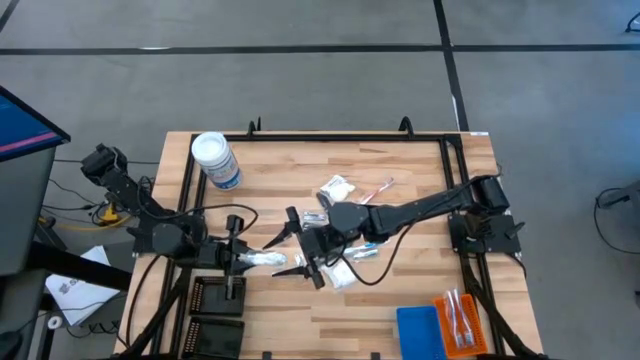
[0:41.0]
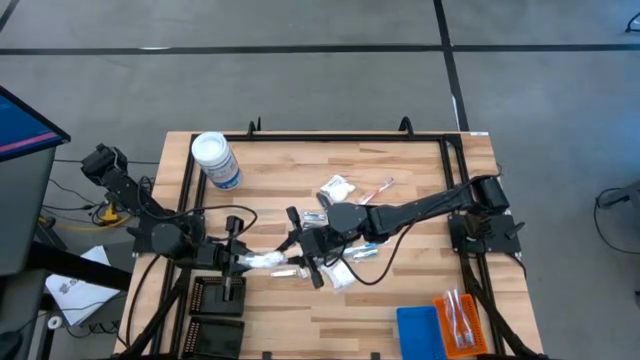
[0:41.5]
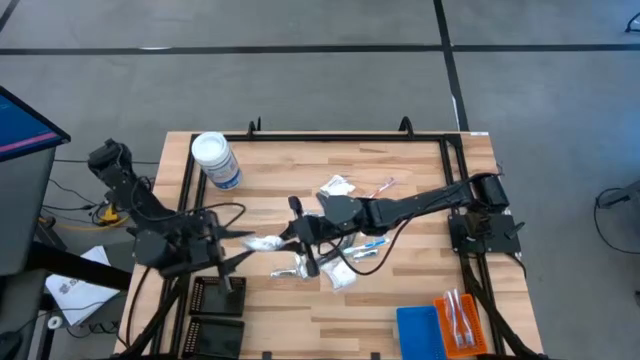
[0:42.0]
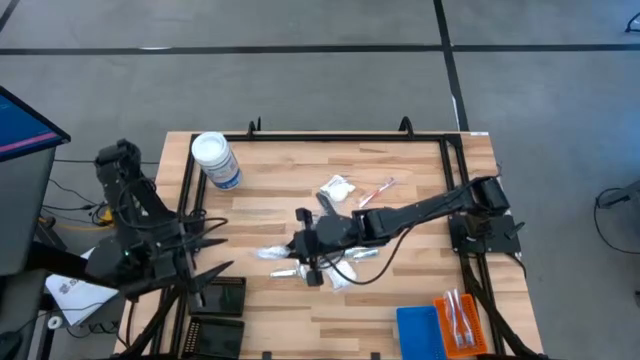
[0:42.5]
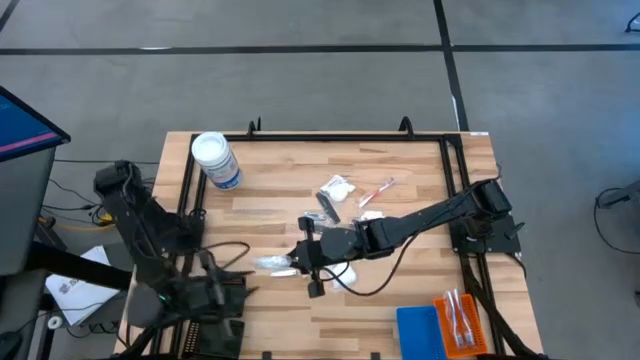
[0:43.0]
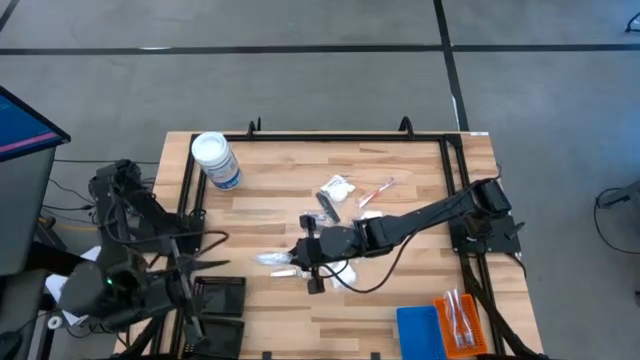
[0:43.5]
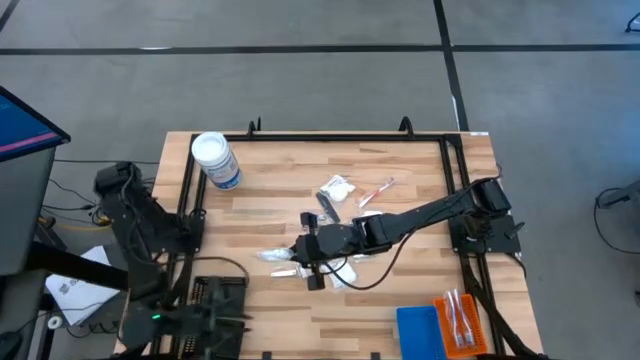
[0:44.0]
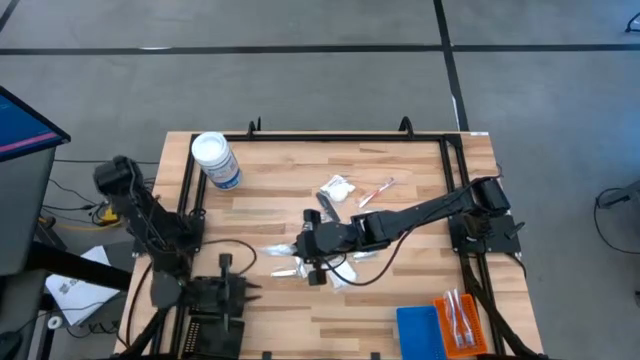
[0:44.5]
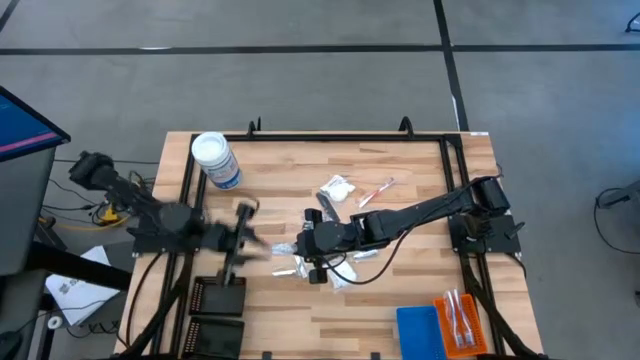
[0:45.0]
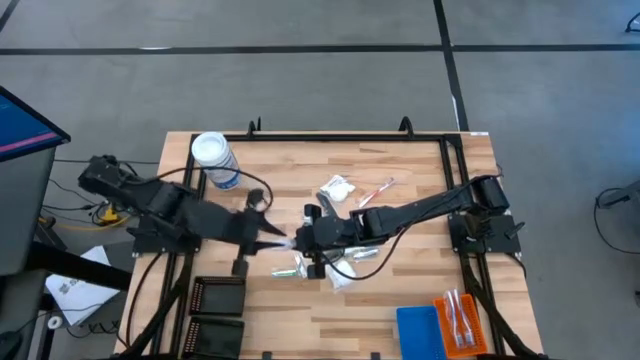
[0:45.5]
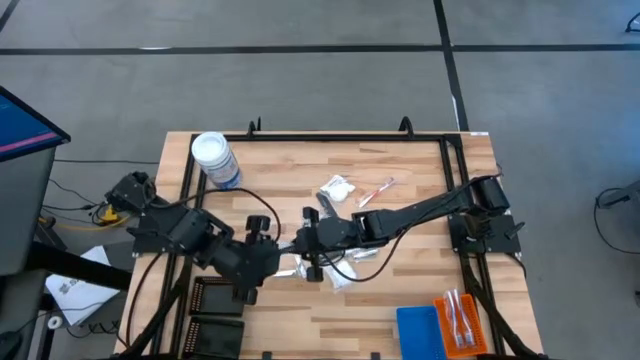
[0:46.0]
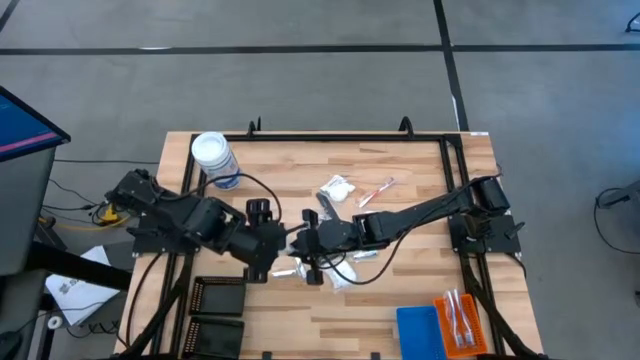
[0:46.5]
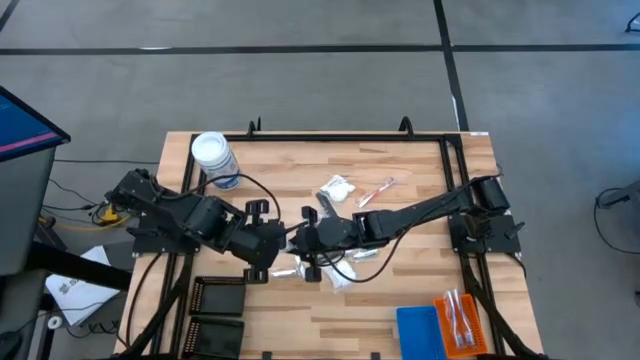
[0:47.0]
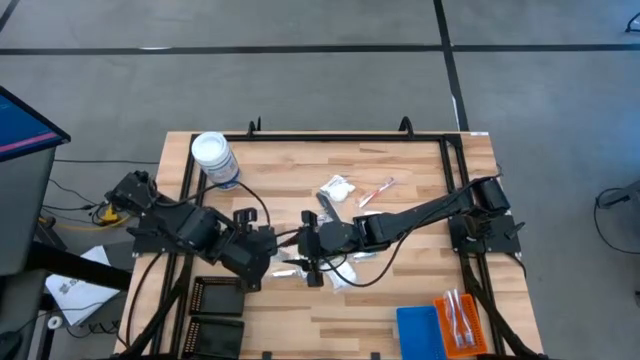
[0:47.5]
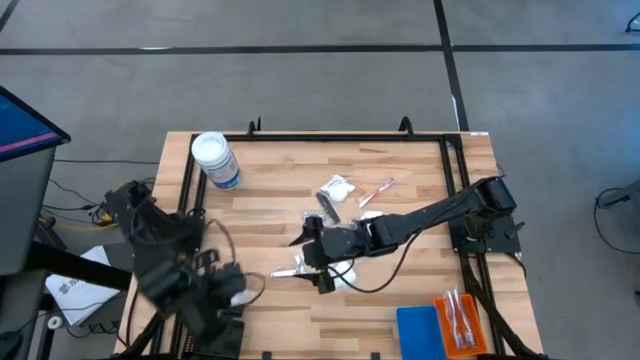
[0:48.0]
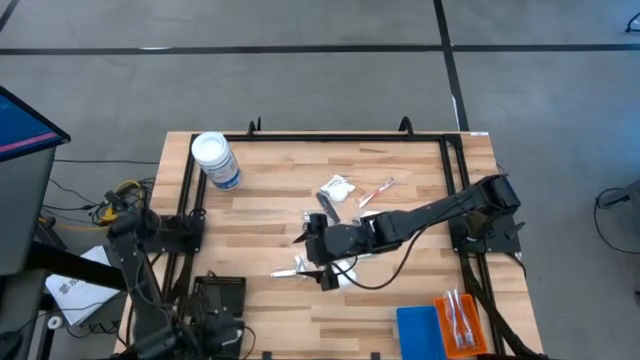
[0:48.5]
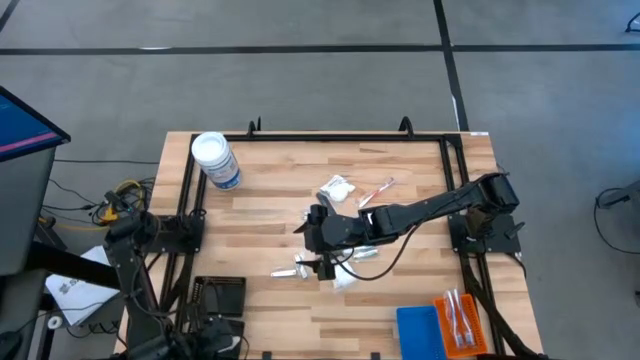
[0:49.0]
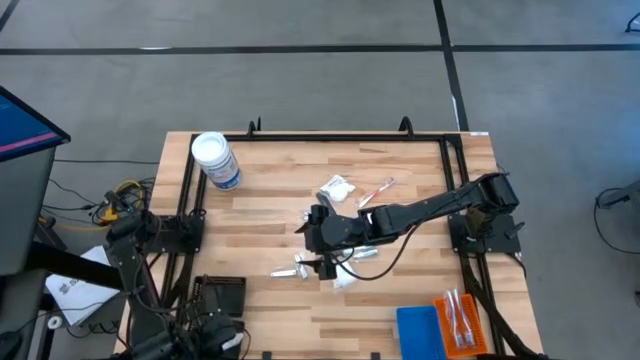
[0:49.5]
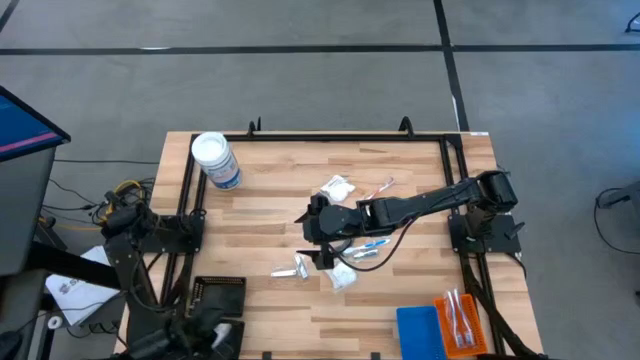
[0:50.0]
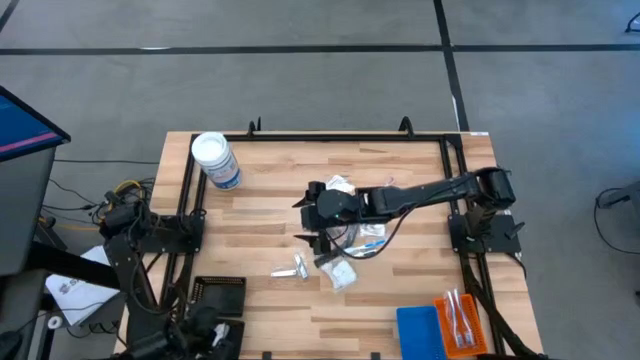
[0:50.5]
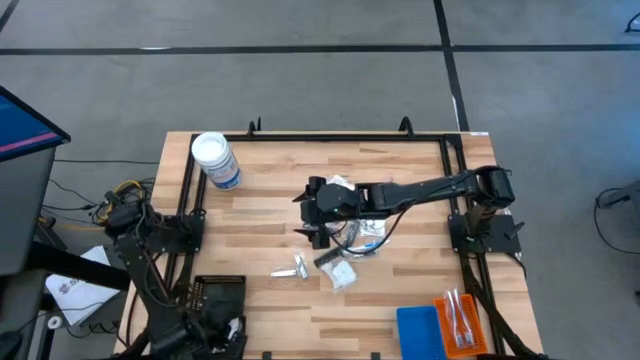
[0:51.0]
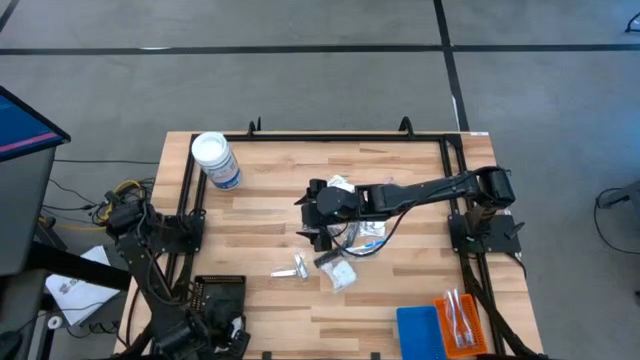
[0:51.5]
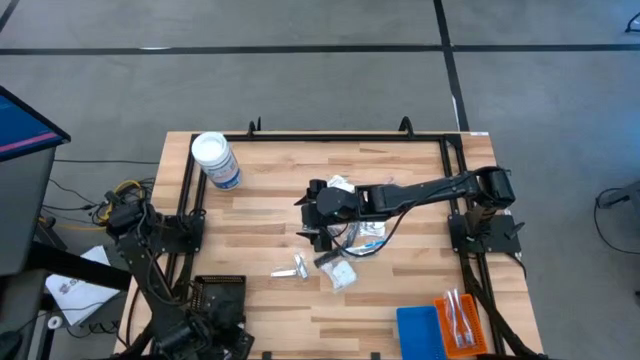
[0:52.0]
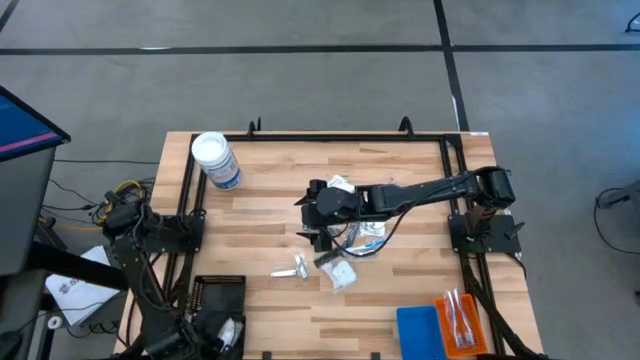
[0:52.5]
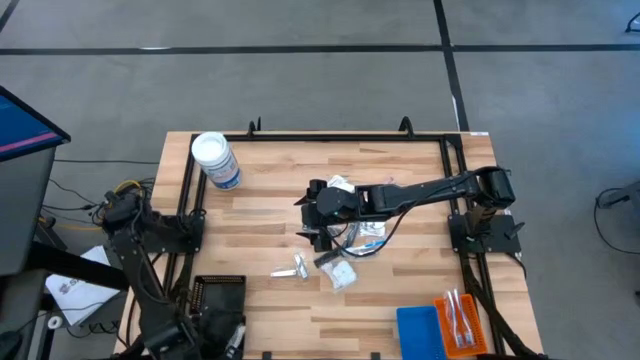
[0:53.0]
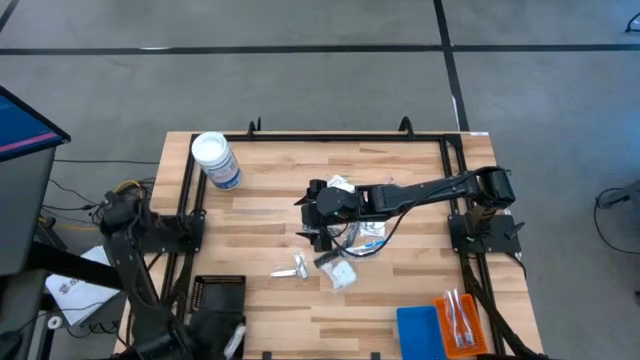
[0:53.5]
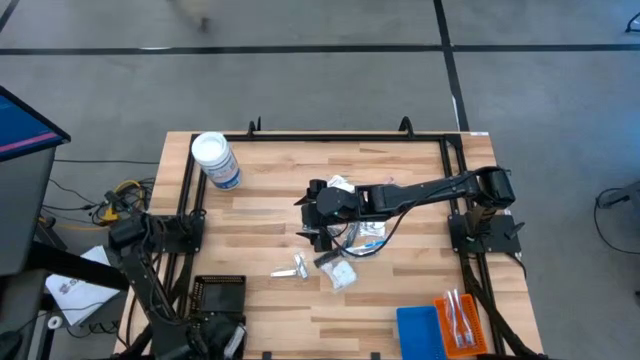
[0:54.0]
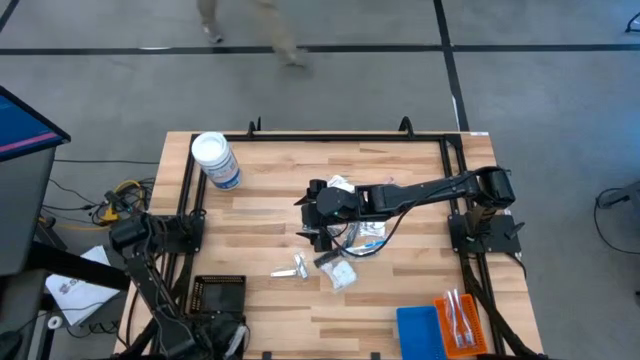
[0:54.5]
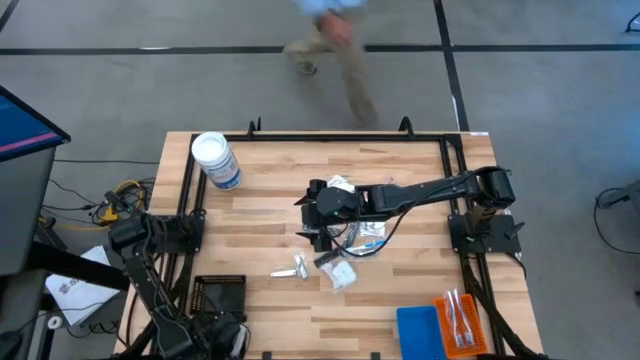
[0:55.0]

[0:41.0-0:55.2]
Task: Pick & Place Travel size toiletries
Put the vanity pack into the bottom black bin

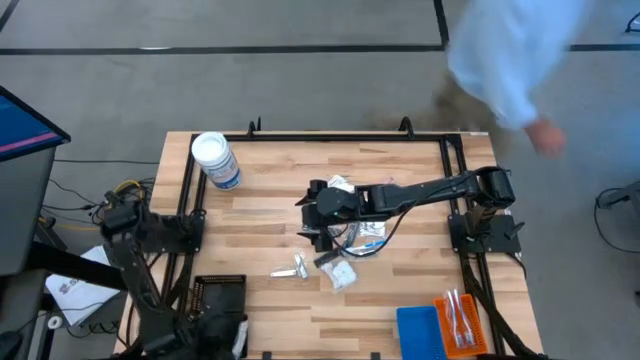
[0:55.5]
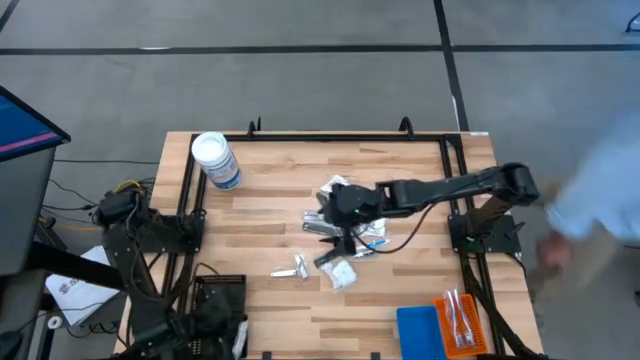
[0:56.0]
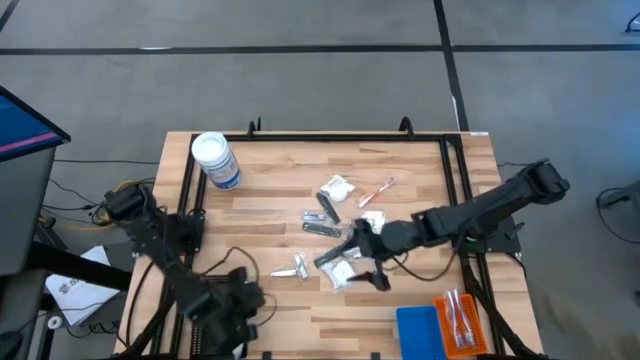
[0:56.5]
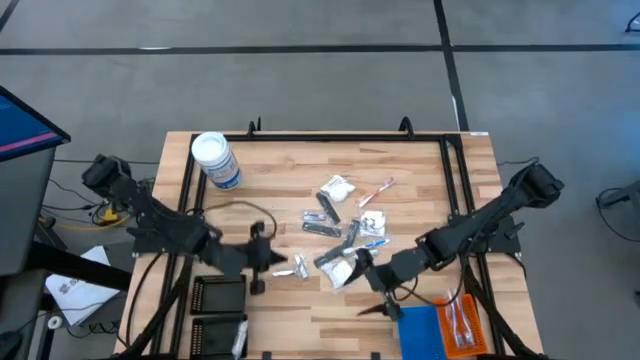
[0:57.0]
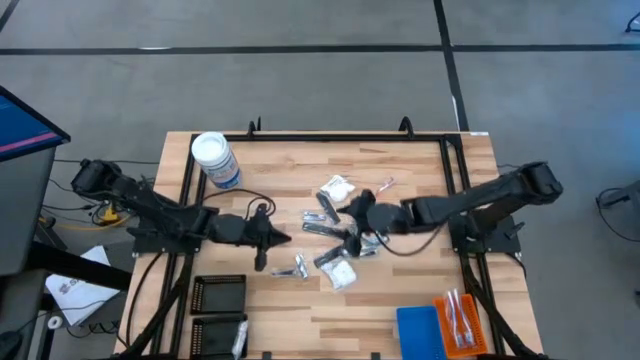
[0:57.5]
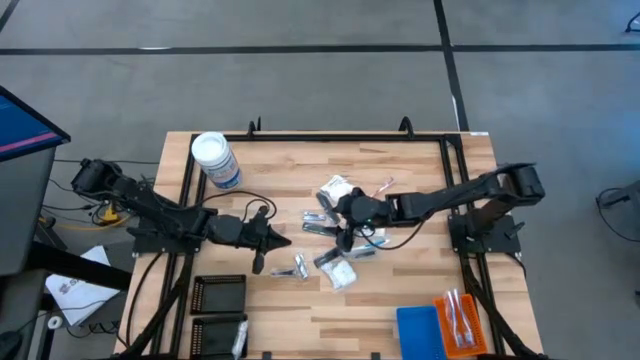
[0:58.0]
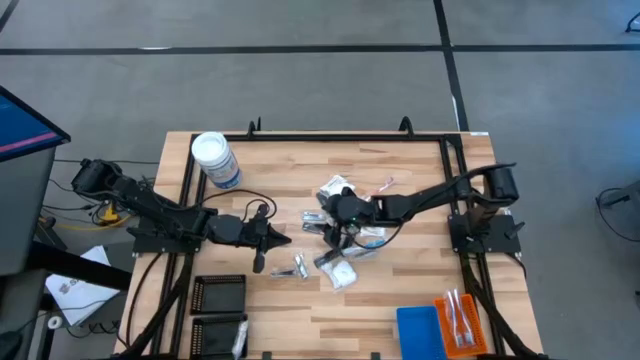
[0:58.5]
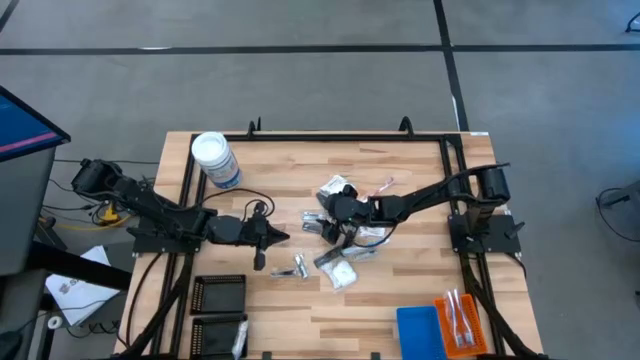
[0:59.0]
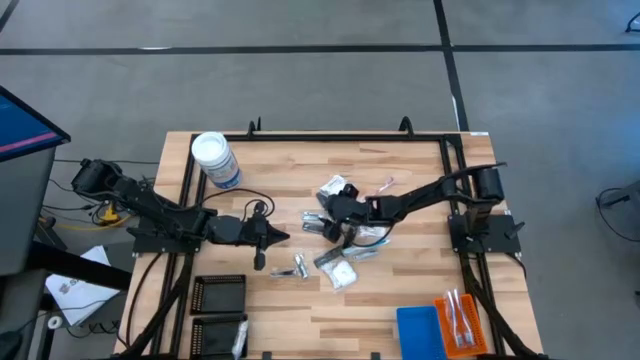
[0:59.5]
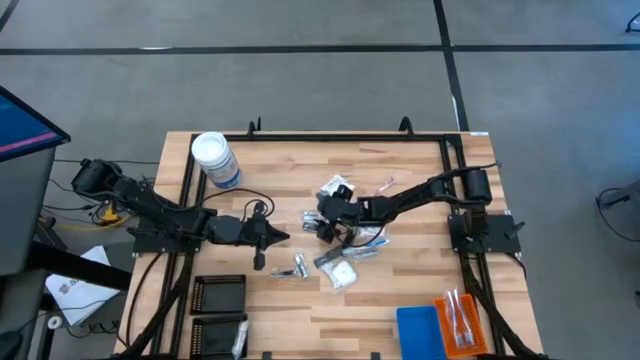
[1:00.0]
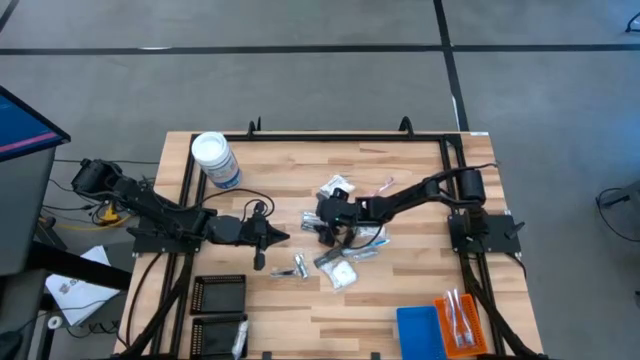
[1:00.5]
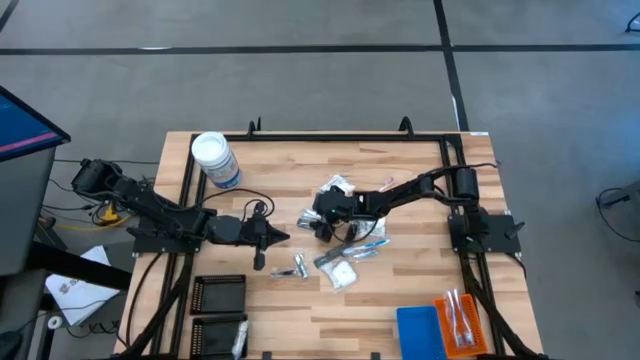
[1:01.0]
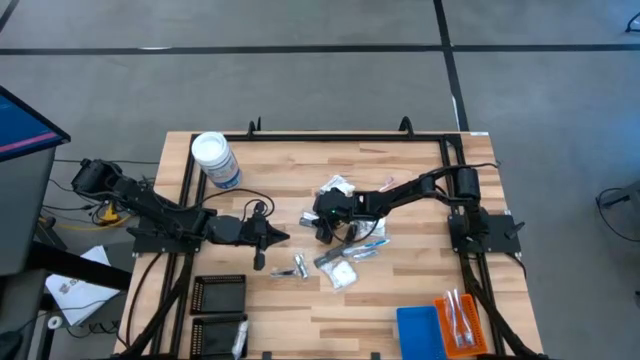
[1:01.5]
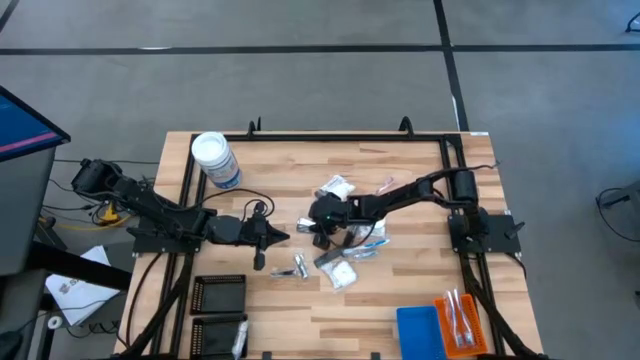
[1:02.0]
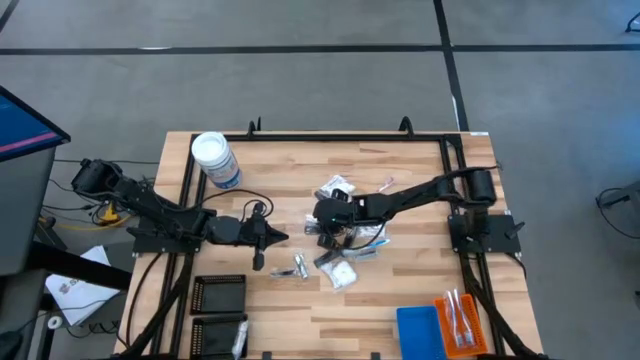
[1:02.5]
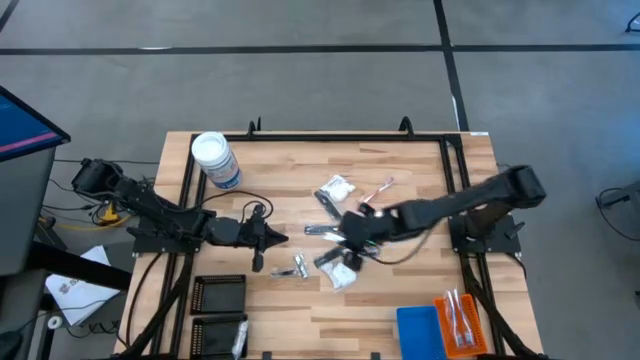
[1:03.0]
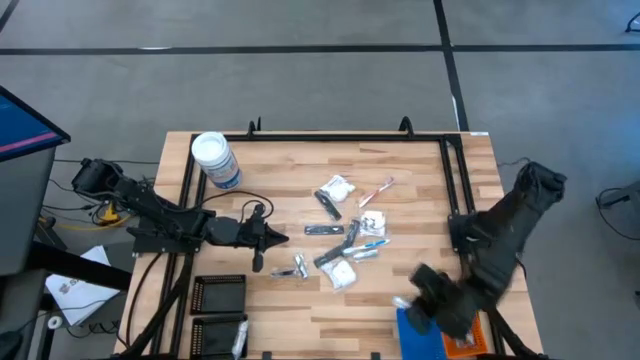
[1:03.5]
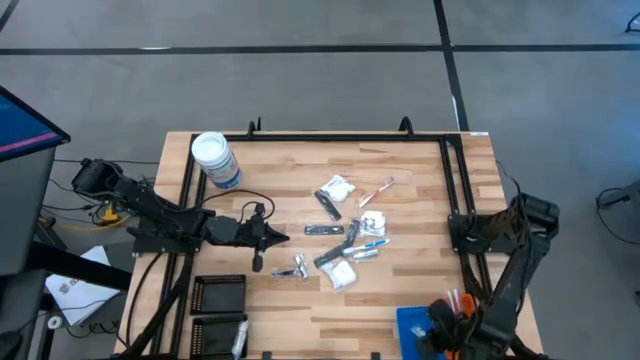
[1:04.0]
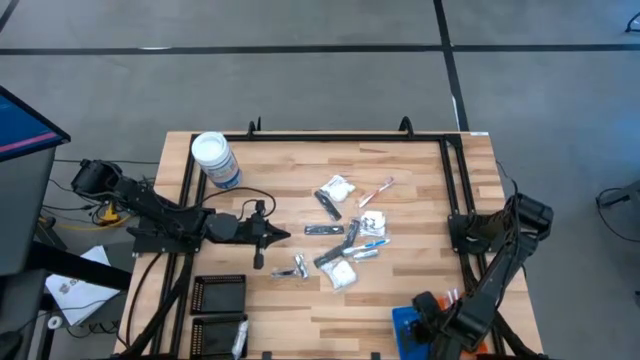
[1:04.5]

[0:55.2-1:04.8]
Put the nail cutter into the blue bin
